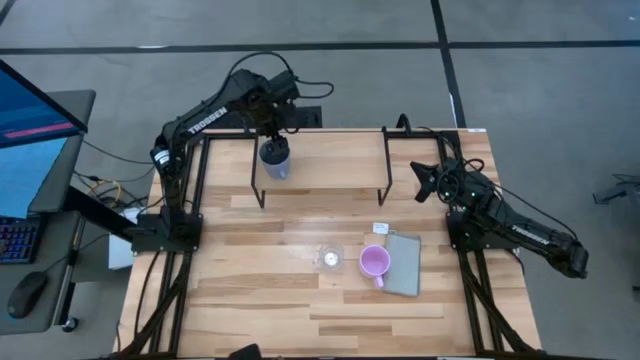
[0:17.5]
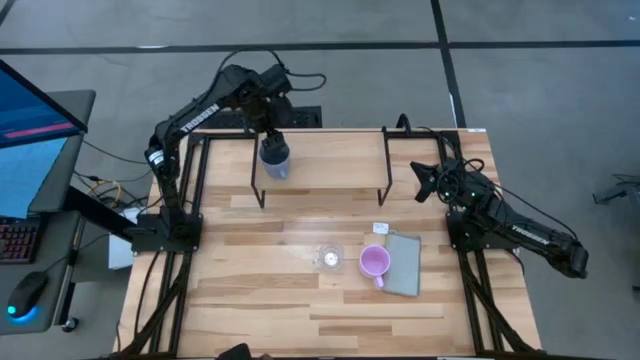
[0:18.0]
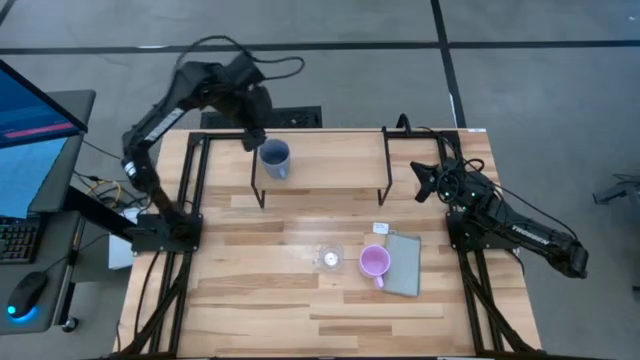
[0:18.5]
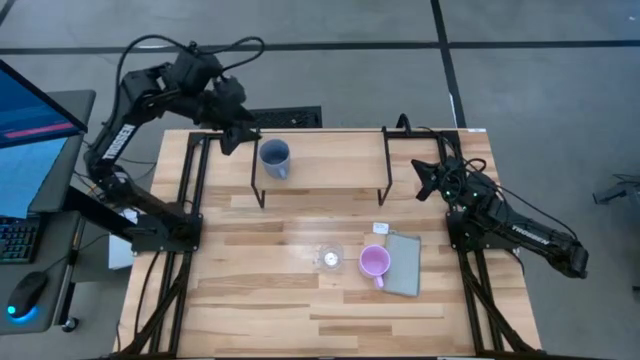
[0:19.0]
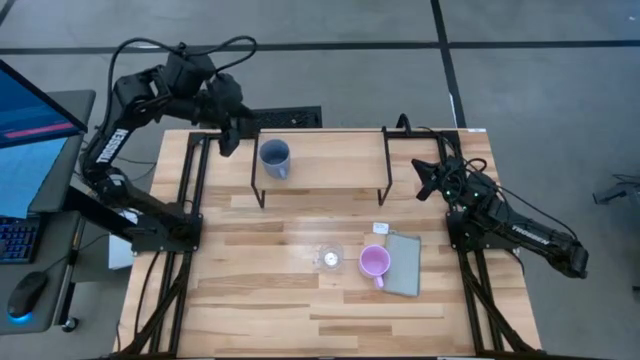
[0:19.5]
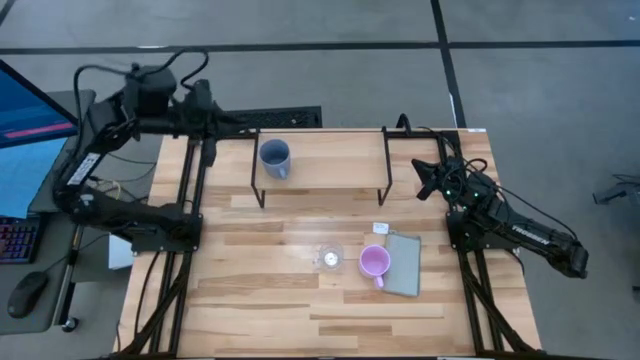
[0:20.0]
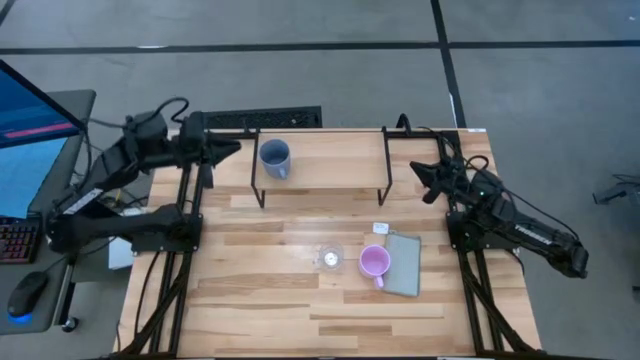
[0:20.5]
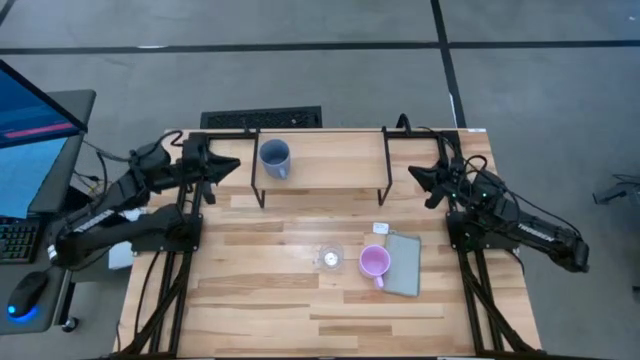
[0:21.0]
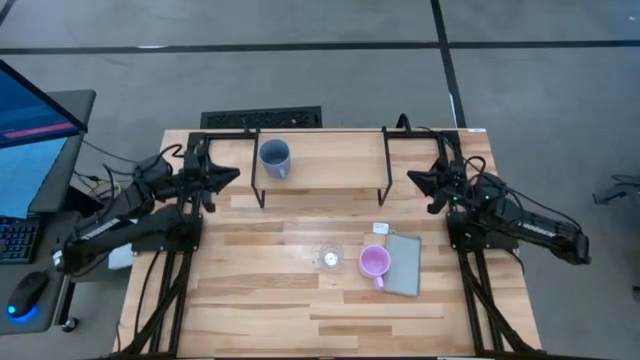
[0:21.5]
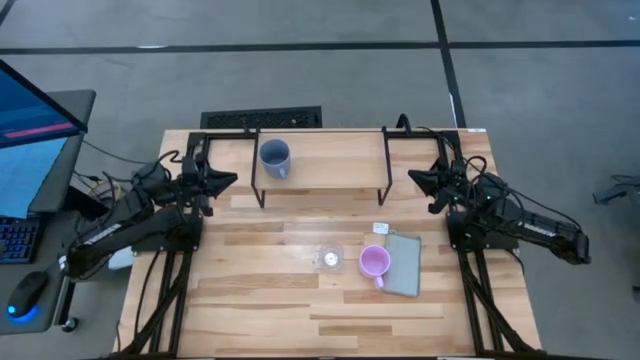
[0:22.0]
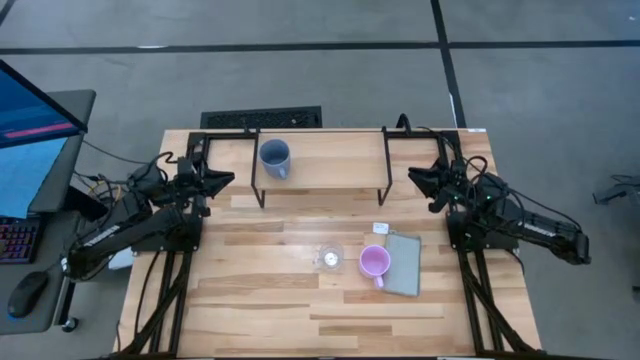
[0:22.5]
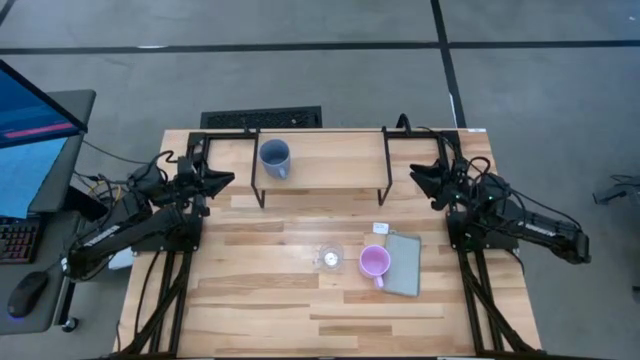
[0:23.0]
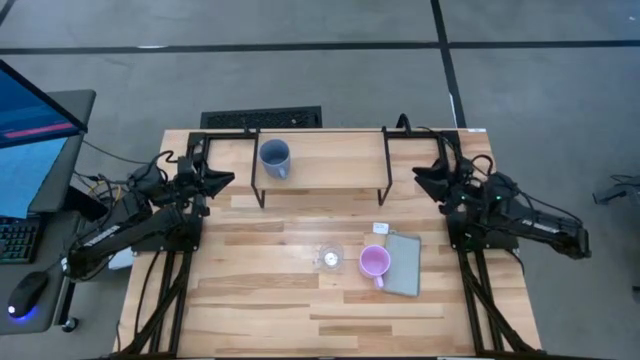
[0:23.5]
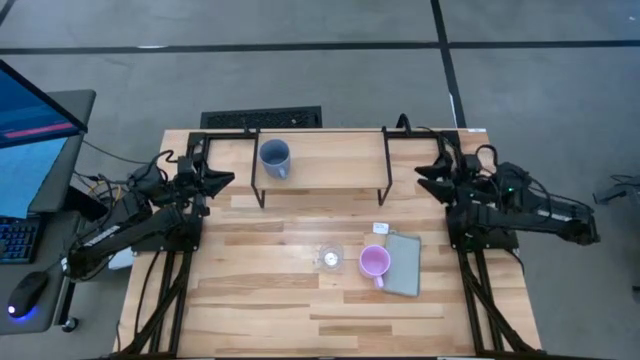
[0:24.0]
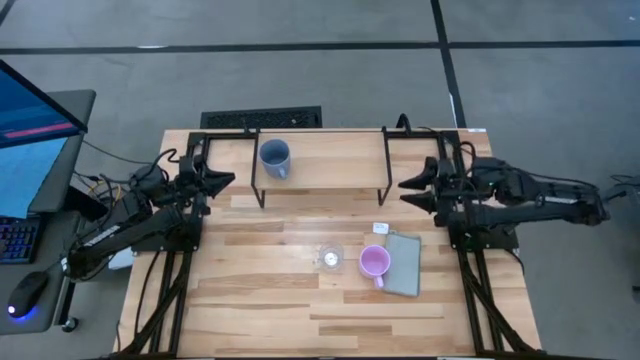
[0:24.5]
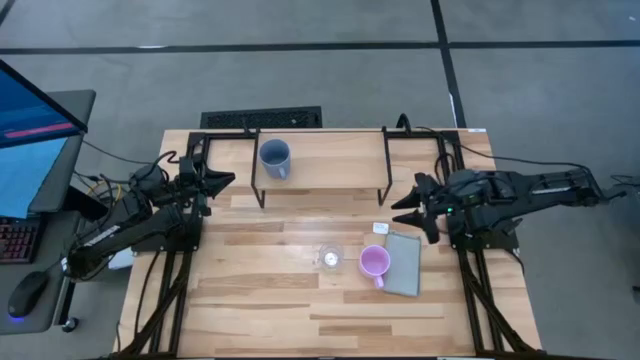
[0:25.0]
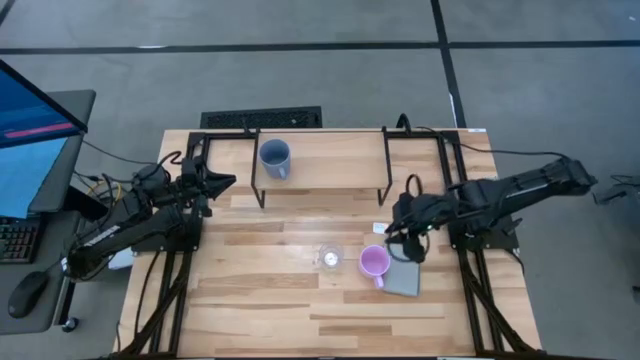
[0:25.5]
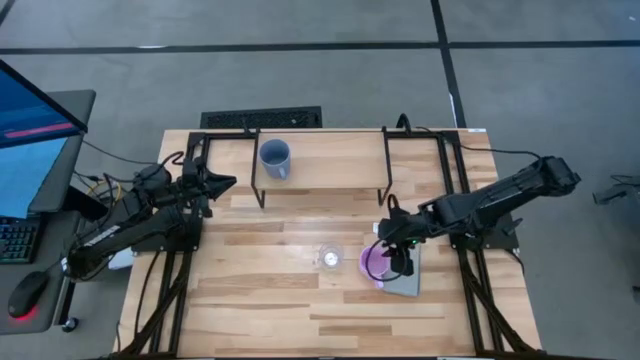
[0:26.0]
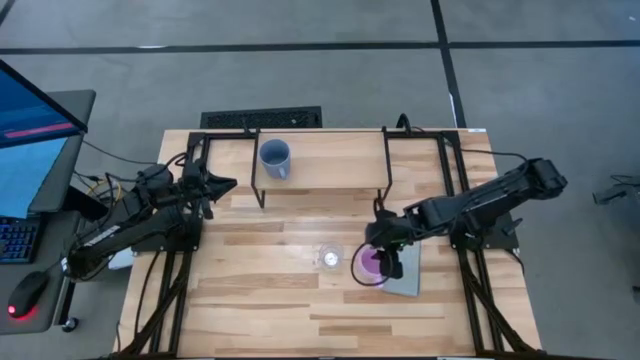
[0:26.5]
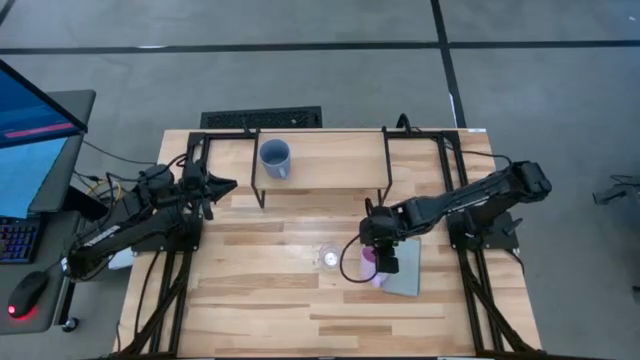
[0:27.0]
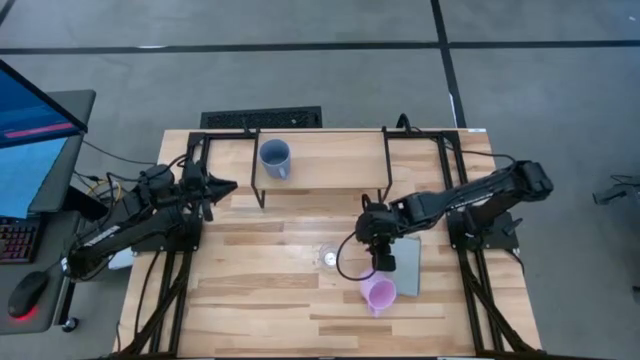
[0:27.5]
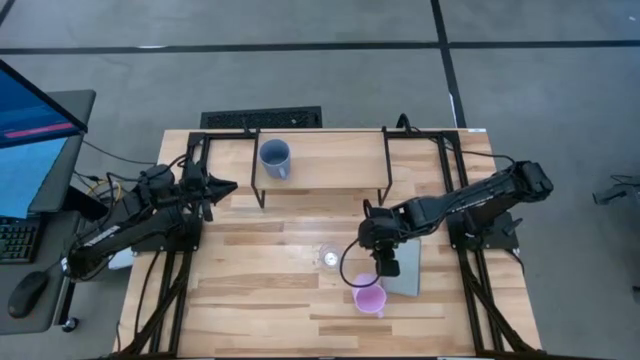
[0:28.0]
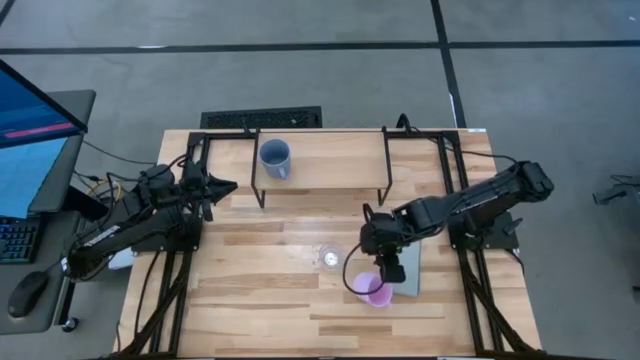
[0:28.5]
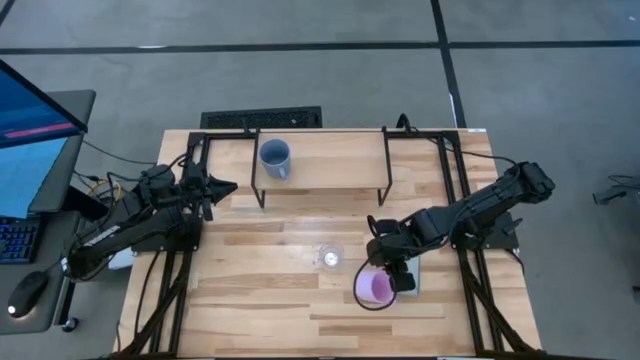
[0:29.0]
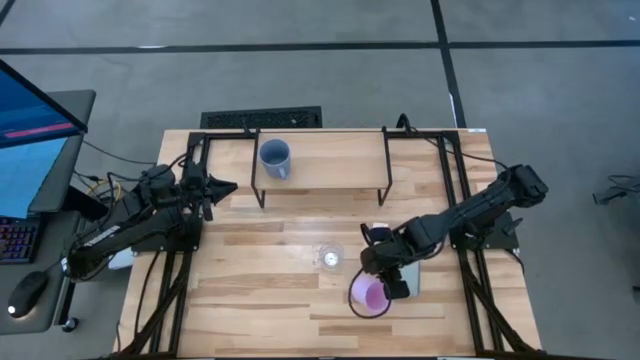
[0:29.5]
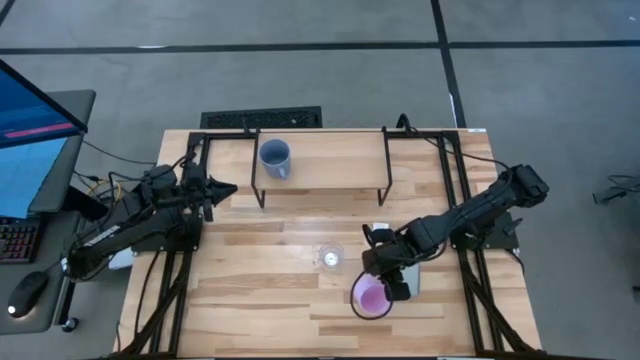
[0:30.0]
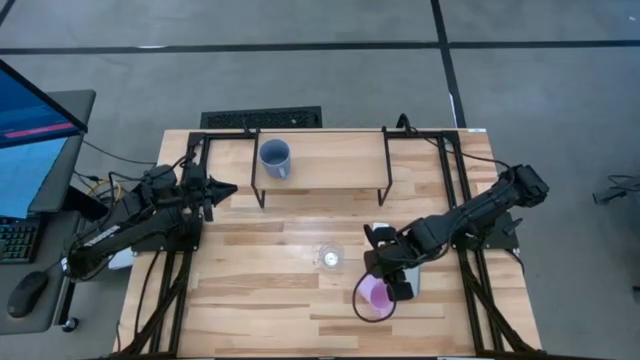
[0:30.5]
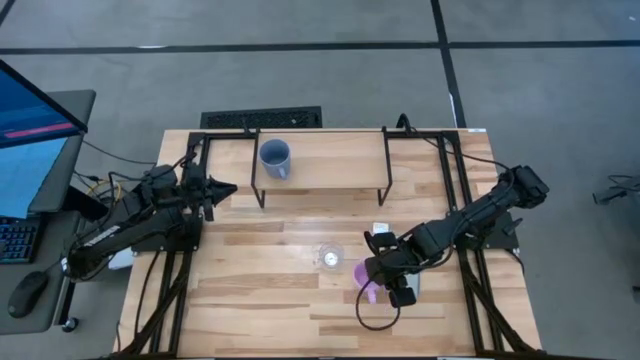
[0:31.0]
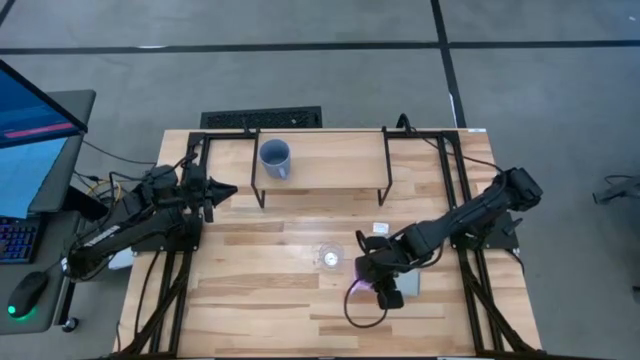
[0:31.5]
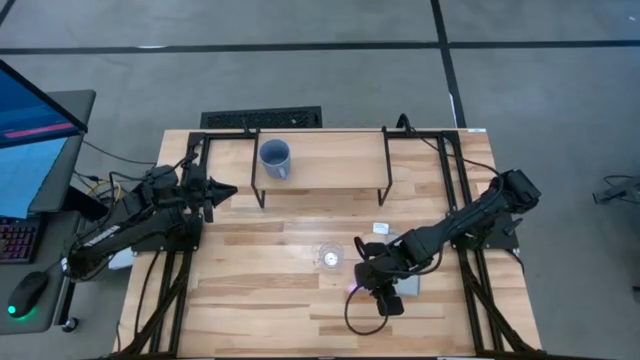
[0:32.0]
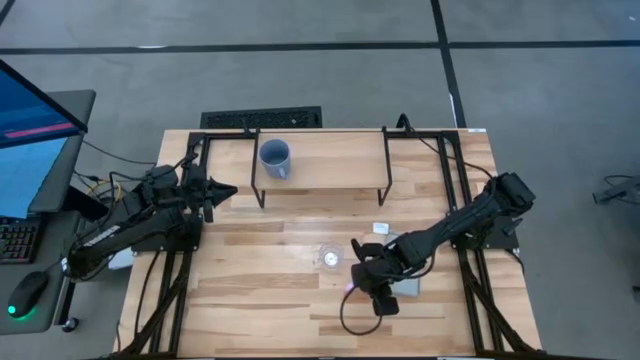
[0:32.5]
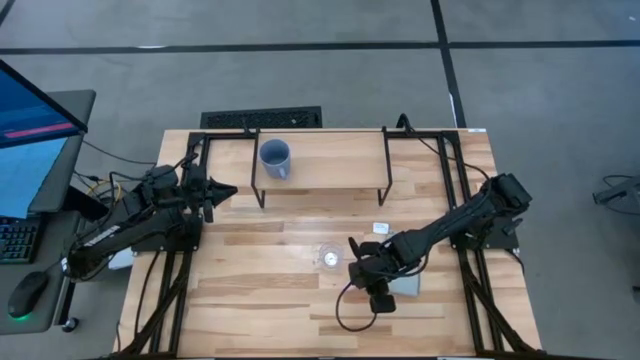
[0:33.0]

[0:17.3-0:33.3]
Task: Stack small to large cups/mugs on shelf
Put the pink cup on the shelf

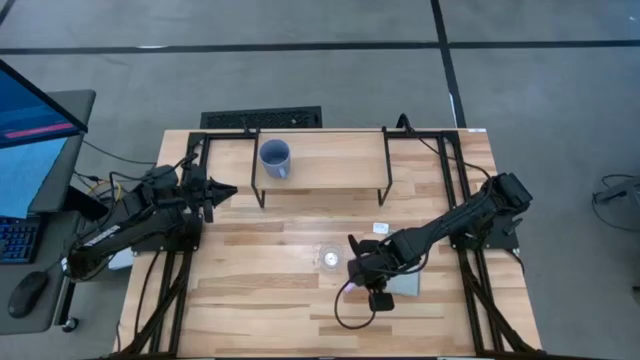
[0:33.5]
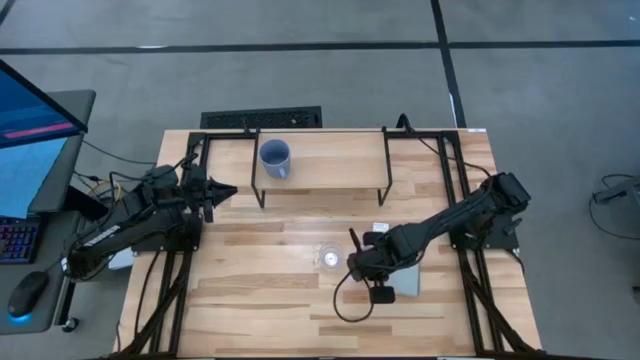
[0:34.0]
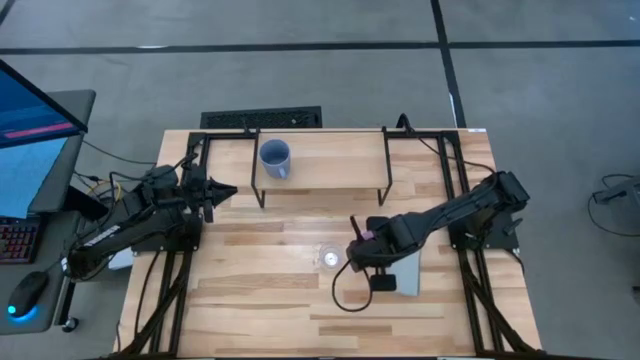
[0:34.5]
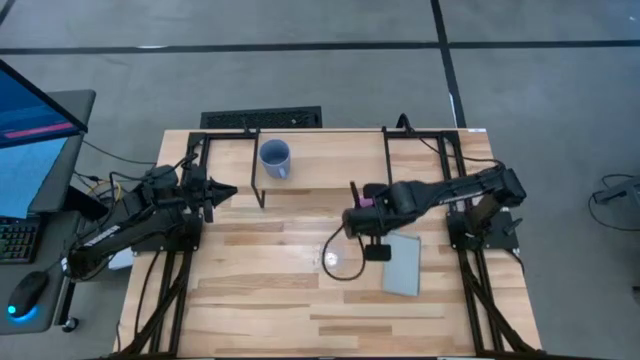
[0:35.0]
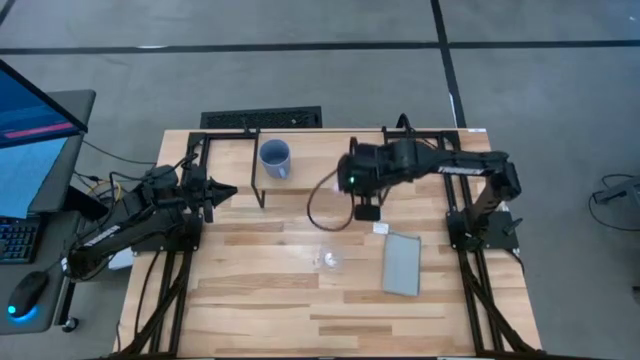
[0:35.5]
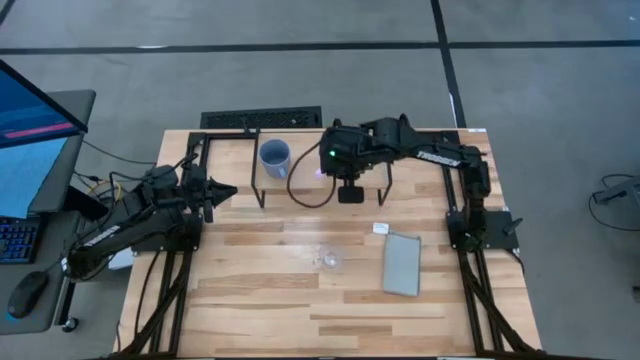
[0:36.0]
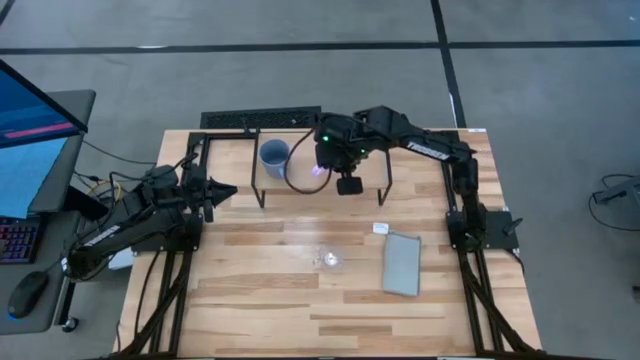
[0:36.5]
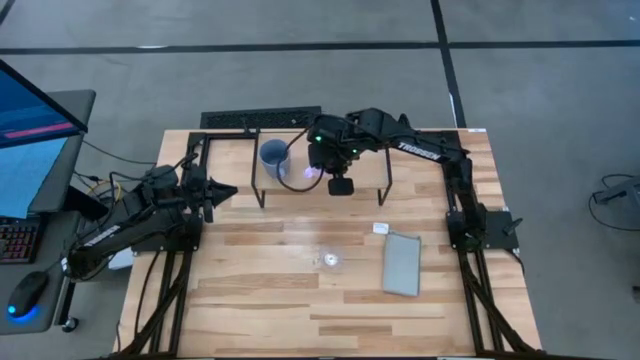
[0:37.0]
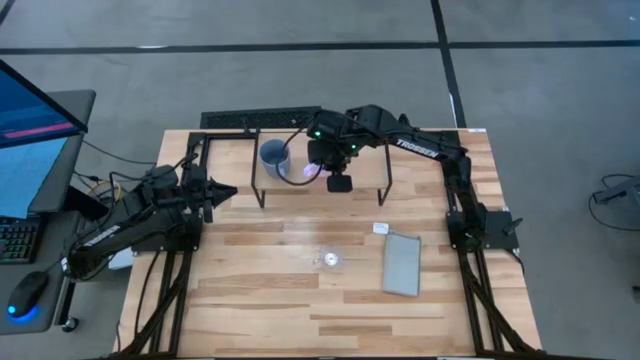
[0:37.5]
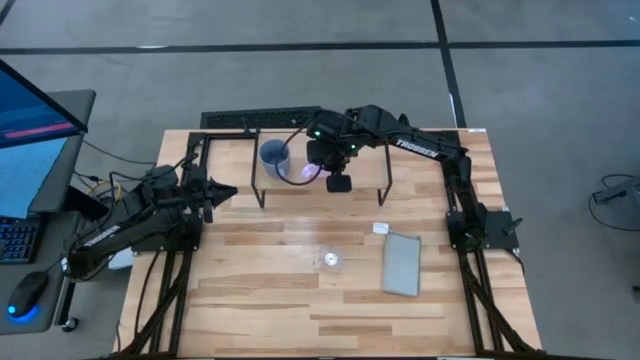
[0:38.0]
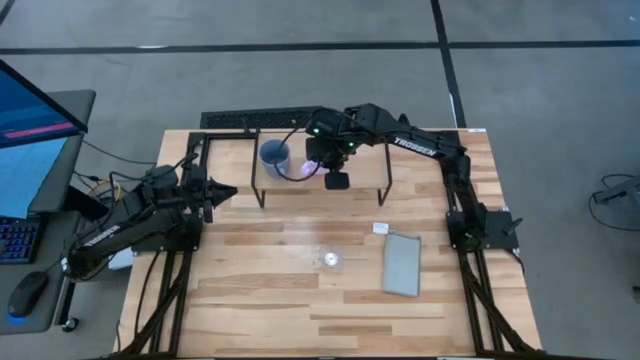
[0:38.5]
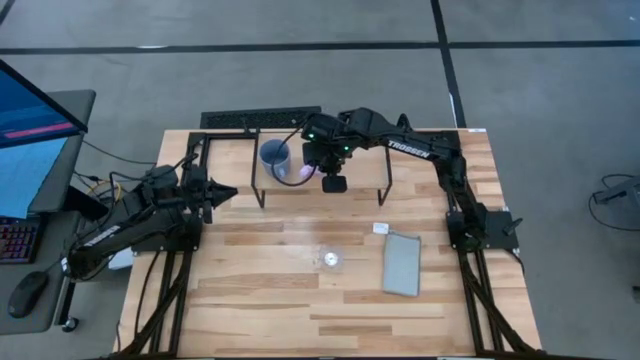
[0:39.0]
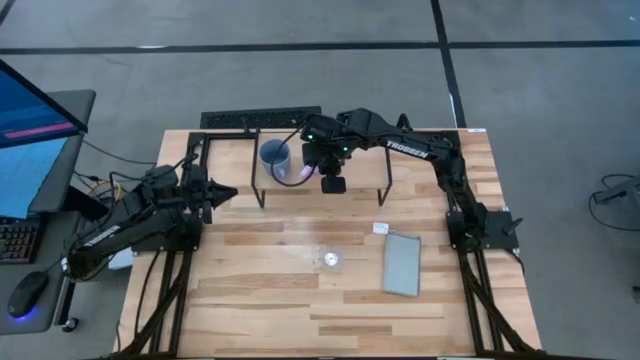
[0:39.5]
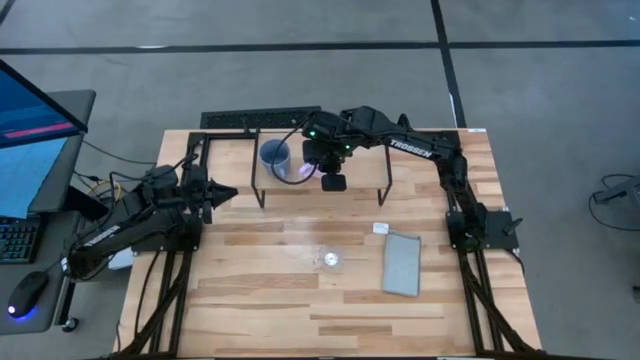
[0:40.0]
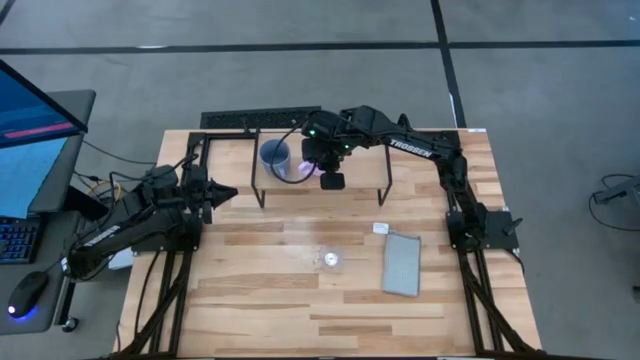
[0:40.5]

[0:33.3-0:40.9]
Put the pink cup on the shelf
